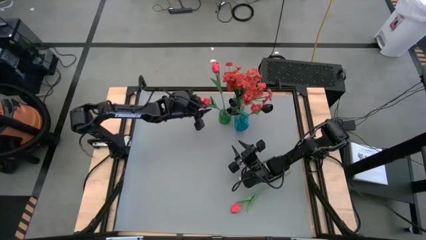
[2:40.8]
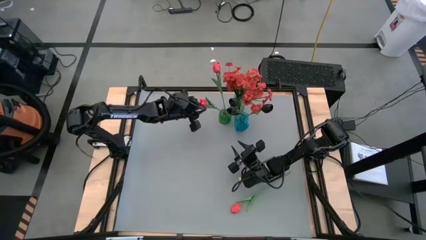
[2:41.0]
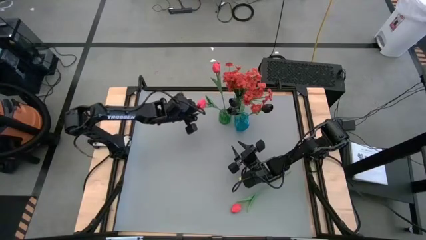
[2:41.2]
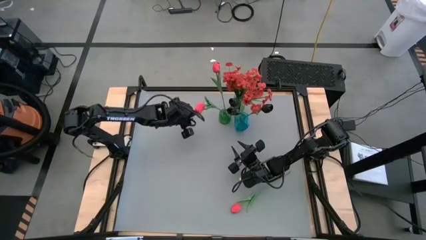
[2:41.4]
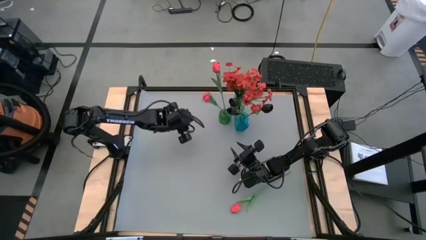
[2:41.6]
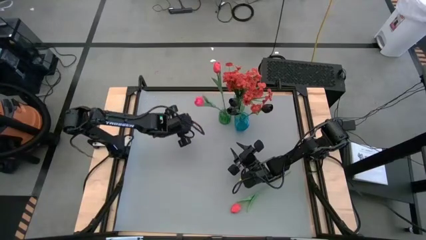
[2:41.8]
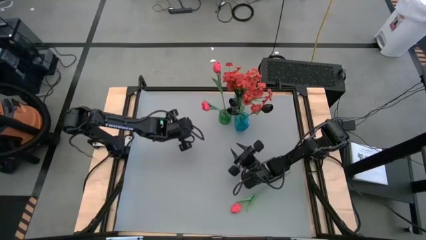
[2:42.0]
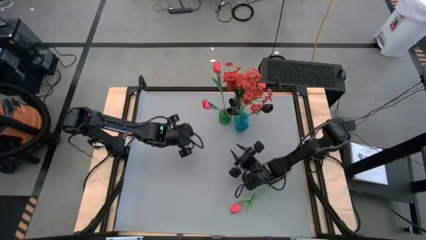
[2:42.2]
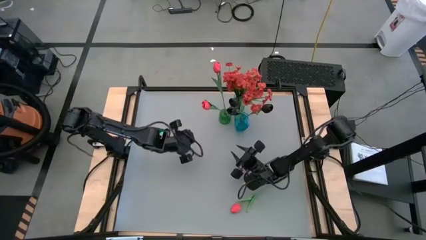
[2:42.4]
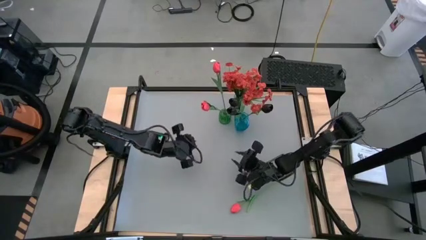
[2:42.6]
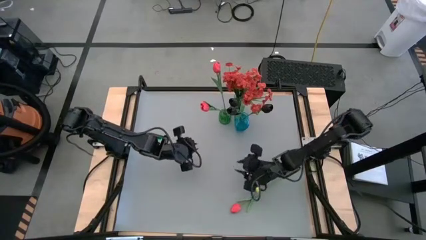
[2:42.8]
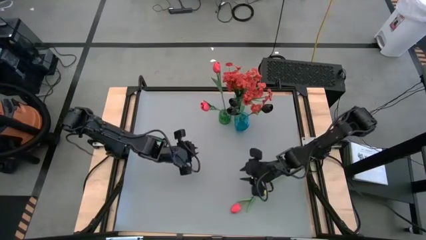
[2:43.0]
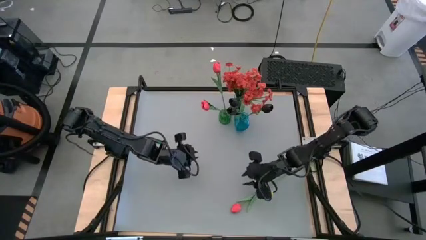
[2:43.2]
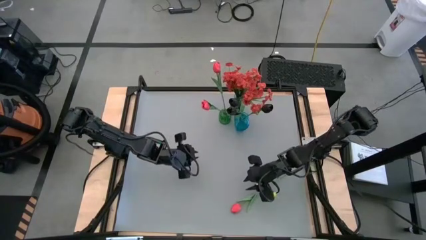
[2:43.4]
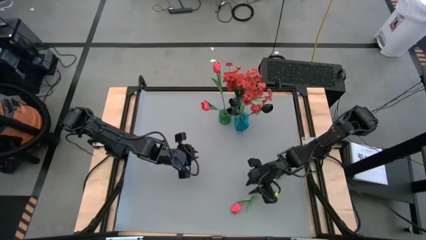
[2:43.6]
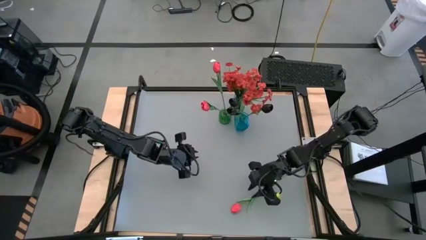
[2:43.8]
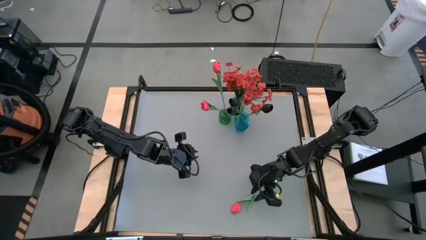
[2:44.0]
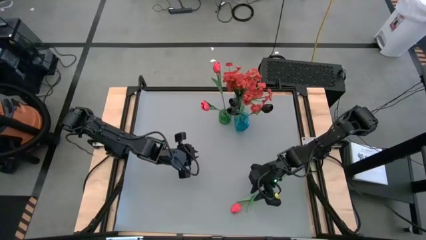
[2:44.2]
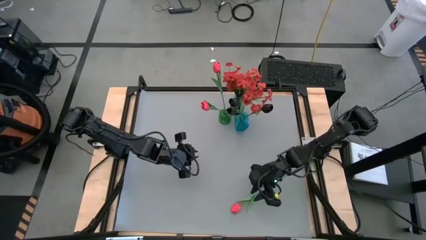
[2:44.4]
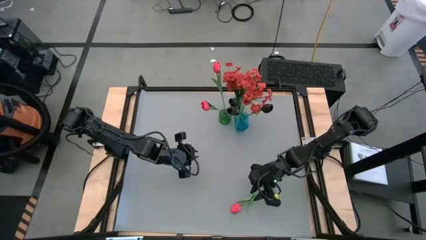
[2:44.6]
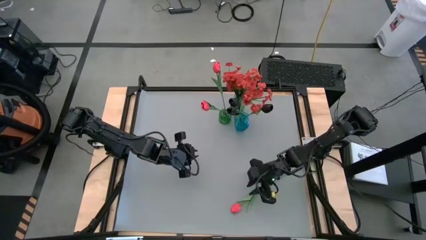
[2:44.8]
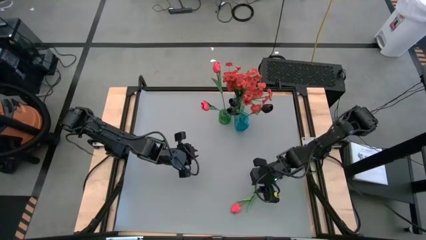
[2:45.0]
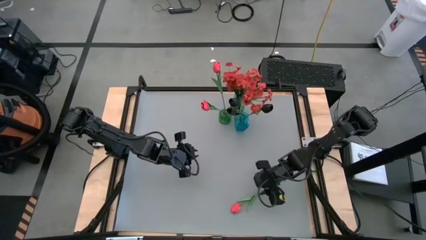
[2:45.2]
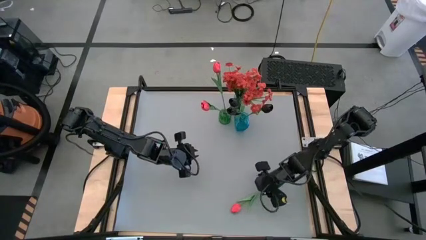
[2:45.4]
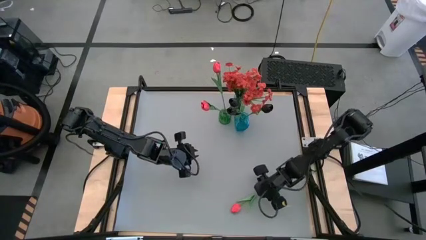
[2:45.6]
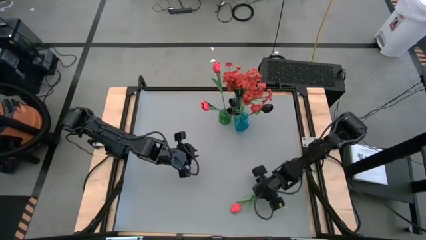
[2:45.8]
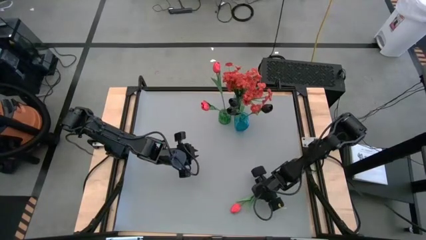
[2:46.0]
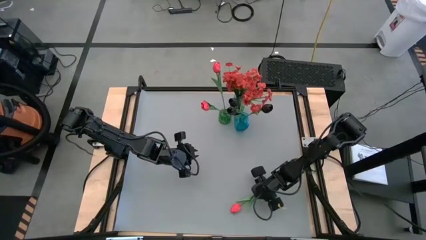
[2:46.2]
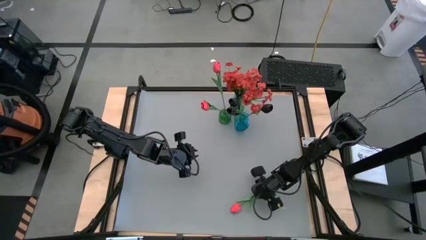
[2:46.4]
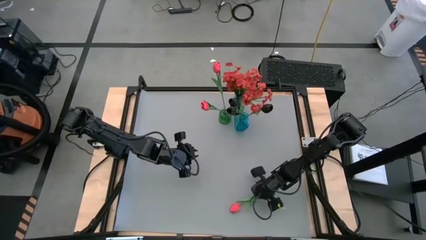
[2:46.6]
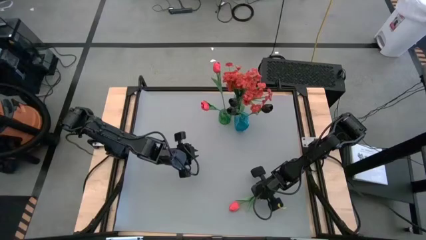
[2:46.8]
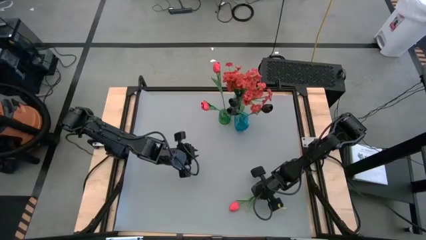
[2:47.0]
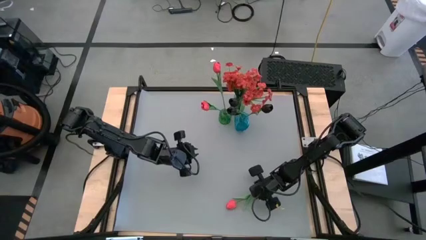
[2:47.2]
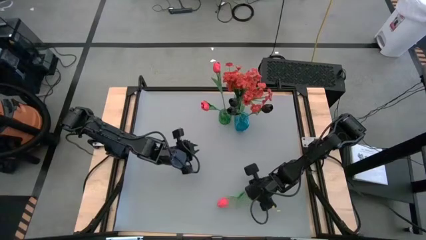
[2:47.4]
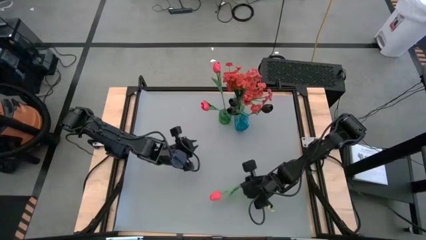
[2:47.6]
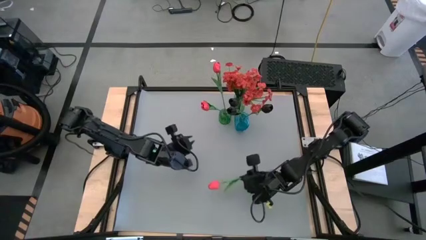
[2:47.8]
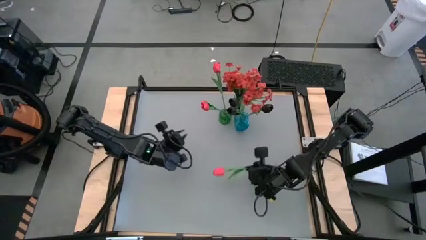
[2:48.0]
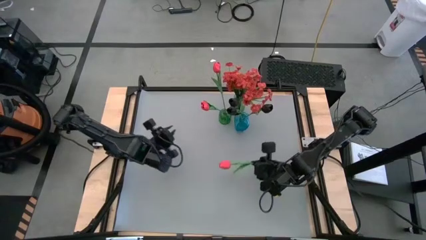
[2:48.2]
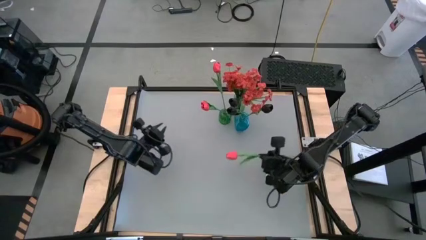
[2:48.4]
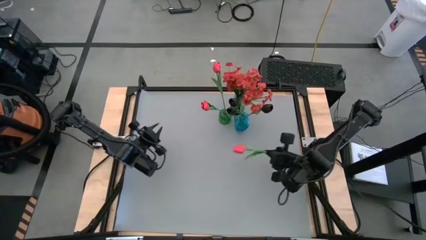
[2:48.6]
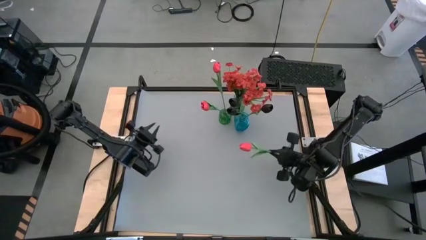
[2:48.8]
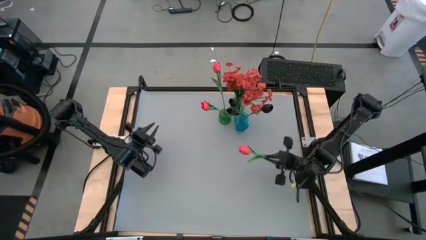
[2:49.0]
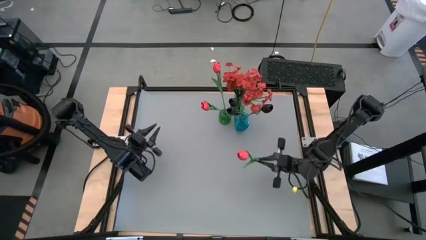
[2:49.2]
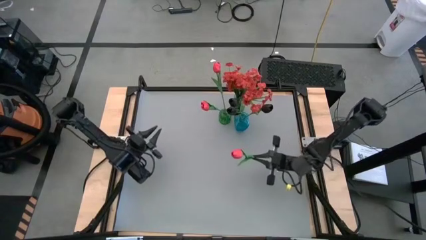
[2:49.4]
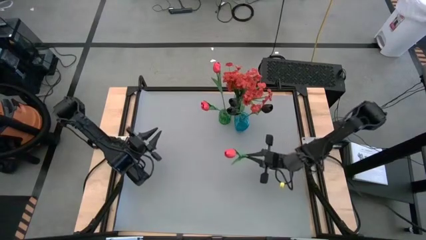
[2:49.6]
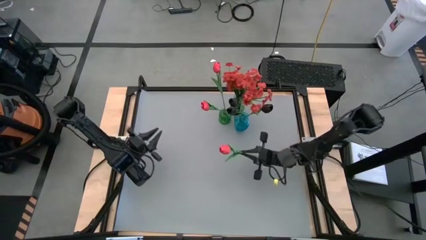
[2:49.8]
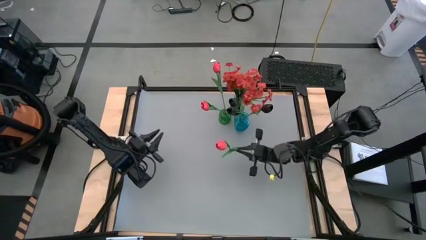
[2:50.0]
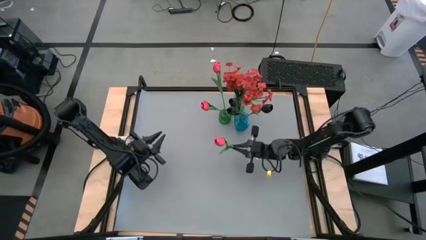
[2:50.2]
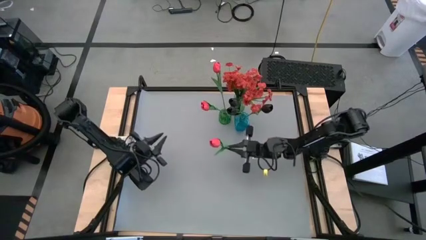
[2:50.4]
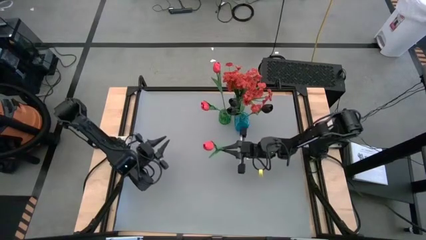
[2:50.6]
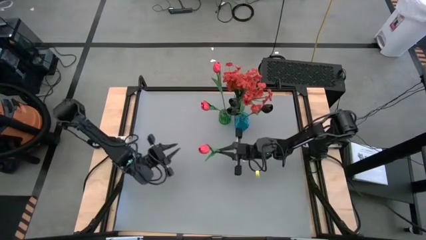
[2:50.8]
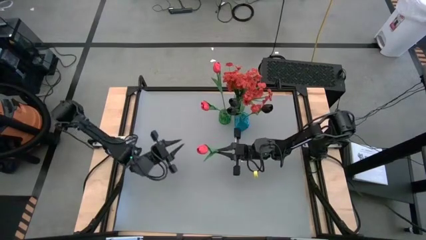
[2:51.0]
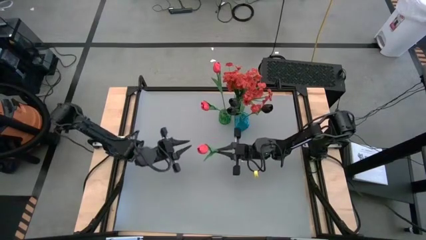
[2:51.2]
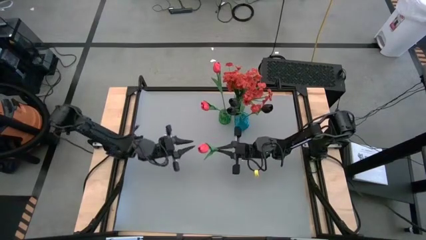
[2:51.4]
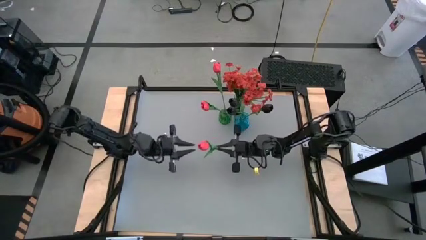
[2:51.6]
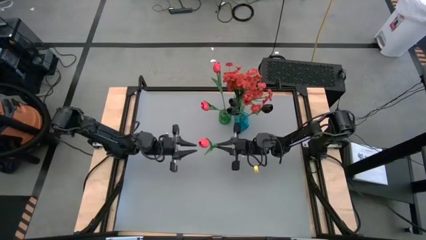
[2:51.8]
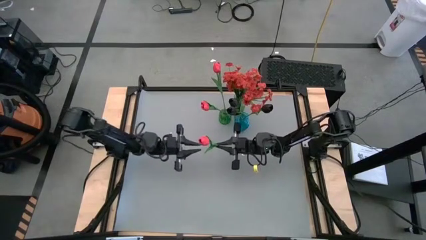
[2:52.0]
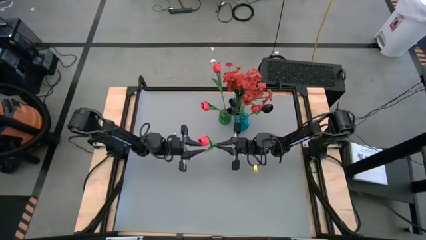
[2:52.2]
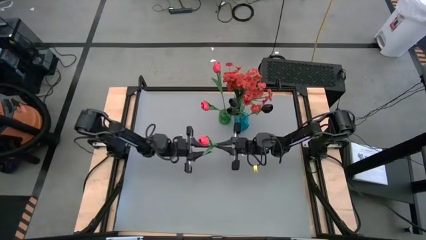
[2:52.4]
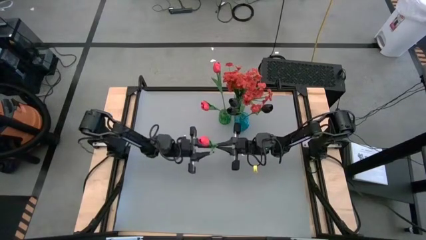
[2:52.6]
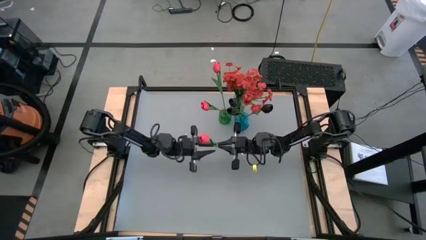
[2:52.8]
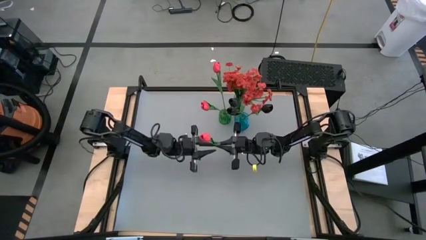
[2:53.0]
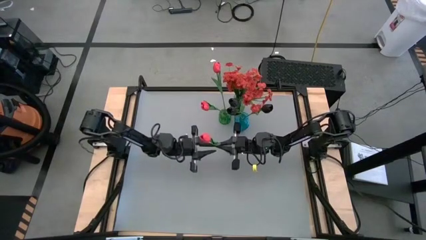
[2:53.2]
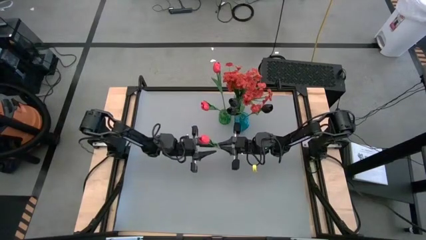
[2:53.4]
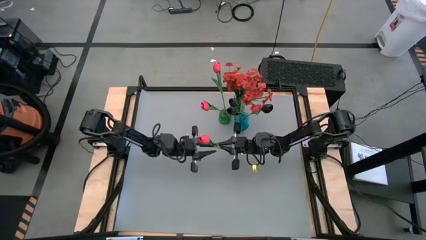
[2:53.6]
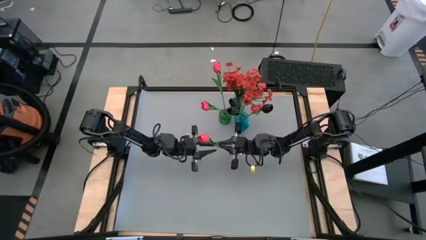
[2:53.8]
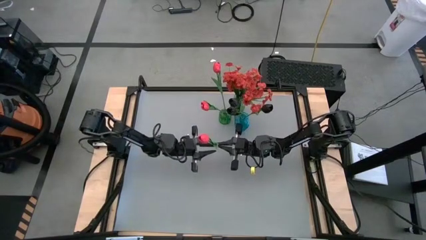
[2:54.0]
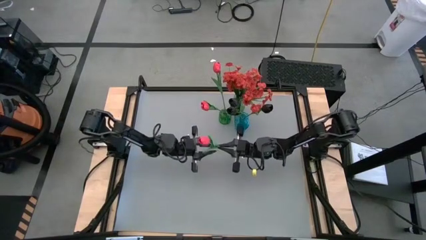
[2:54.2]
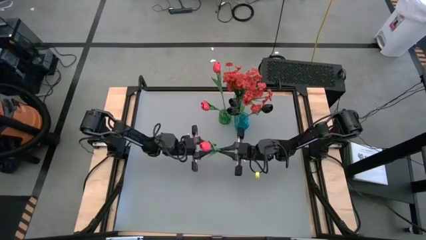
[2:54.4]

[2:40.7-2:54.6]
Task: Sort flowers into vase by color
Put the pink flower into the bottom green vase

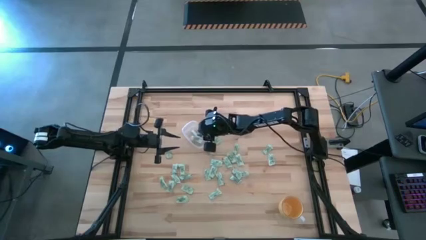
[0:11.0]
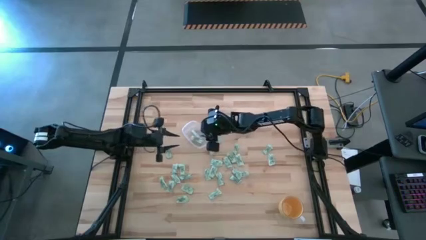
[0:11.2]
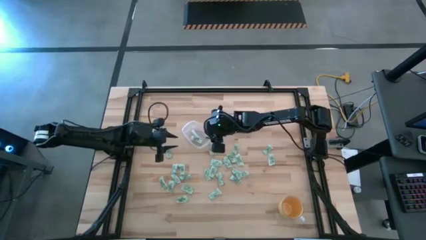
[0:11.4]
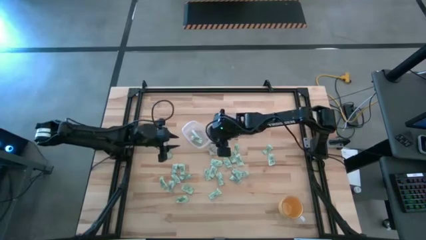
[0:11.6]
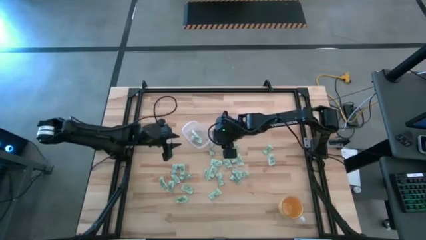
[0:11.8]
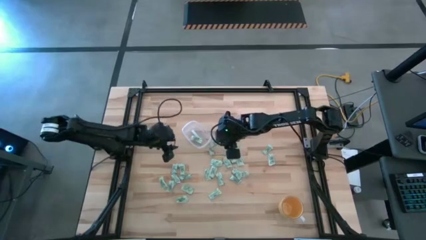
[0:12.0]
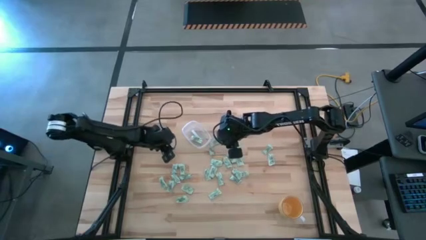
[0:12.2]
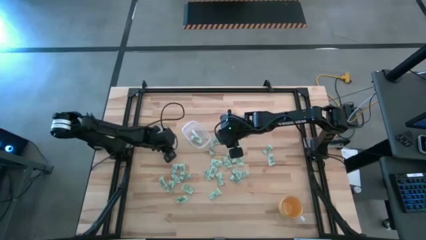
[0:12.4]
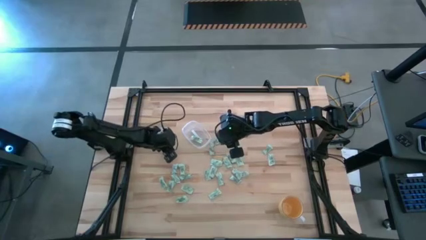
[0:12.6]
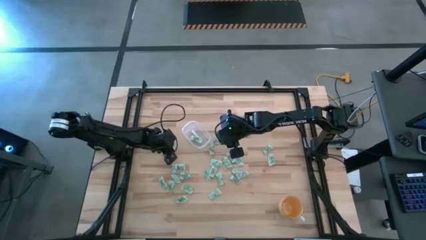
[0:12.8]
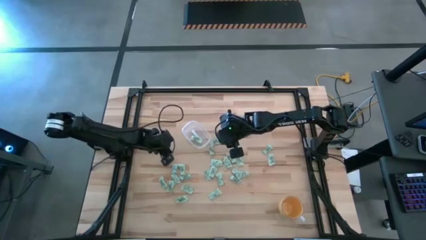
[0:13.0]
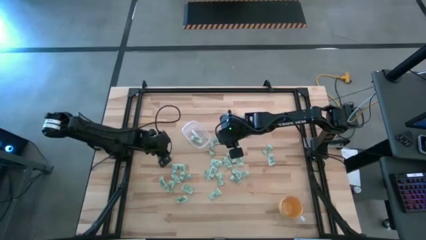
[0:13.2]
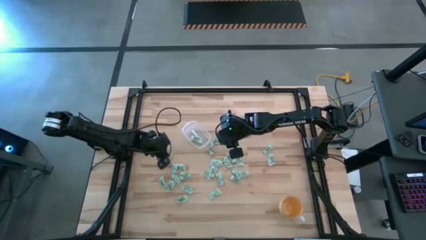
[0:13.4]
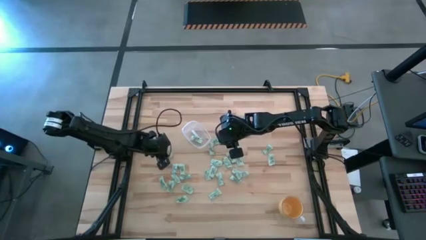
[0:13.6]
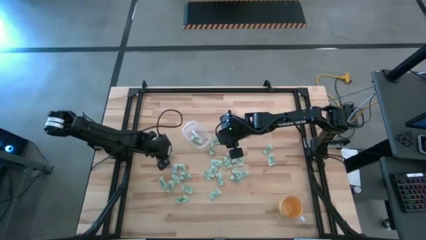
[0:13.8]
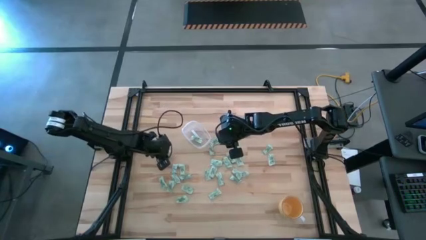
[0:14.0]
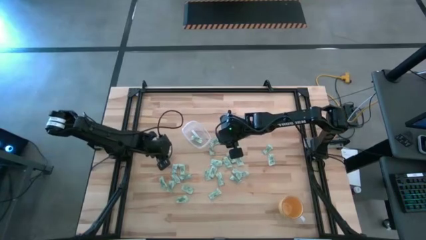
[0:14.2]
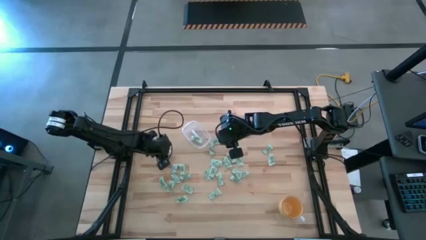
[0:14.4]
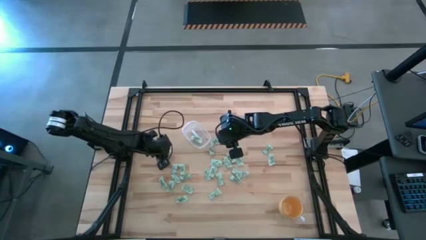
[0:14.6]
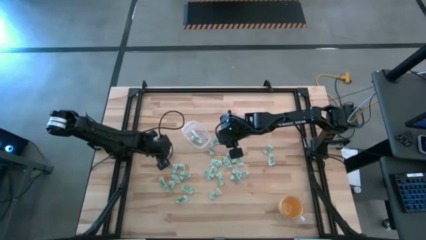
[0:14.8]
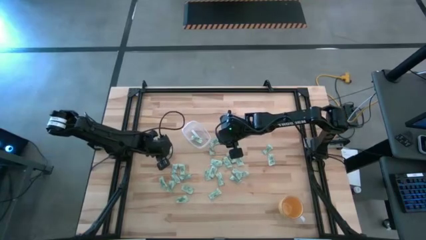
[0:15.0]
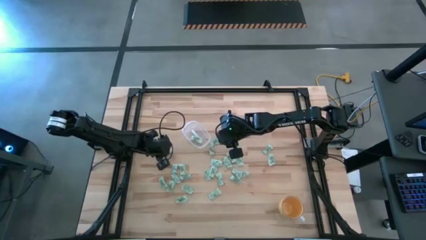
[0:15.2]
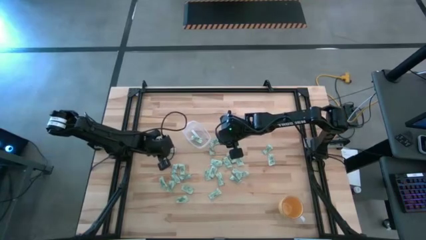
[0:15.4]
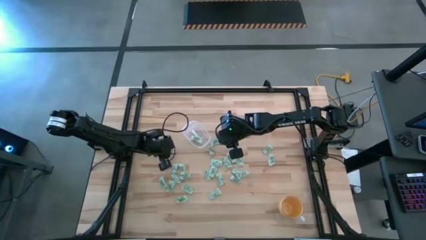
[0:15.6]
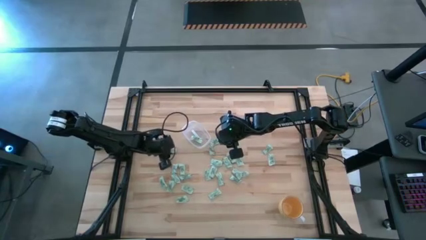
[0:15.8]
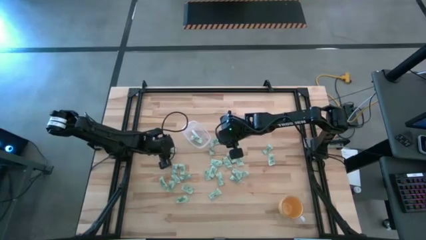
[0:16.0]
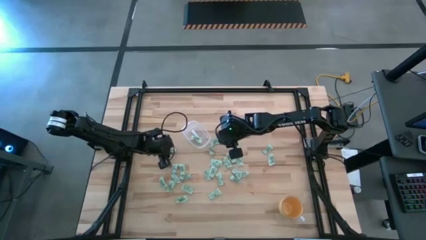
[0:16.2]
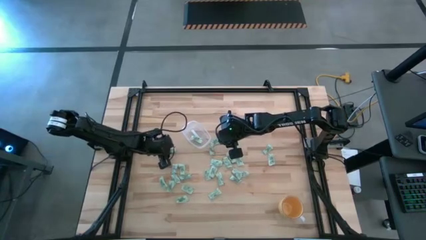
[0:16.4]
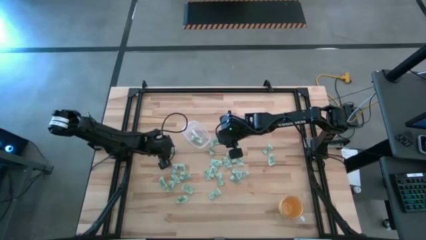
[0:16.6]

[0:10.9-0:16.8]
Task: Pick and place Stevia / Truvia into bins
Put the stevia packet into the transparent bin
